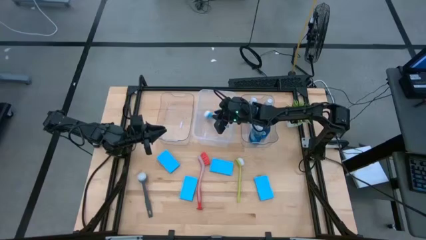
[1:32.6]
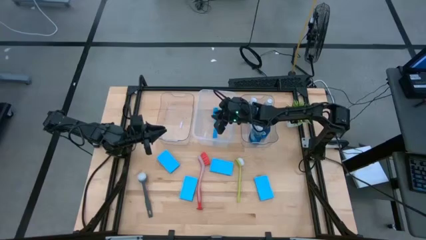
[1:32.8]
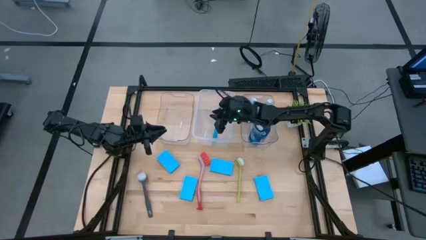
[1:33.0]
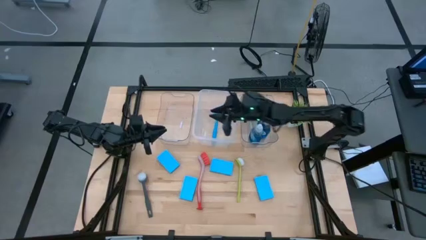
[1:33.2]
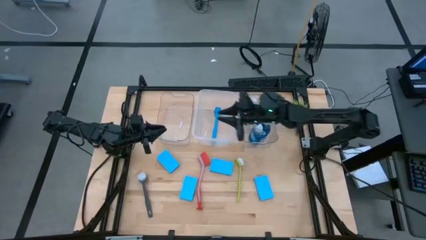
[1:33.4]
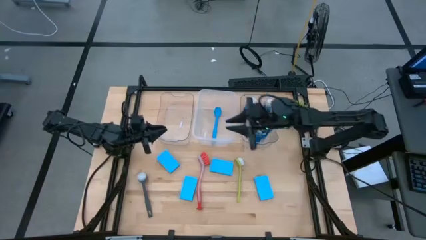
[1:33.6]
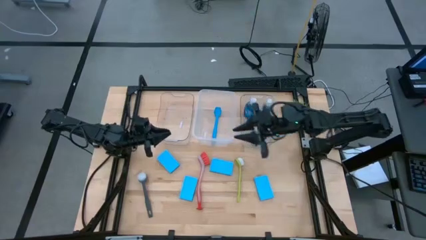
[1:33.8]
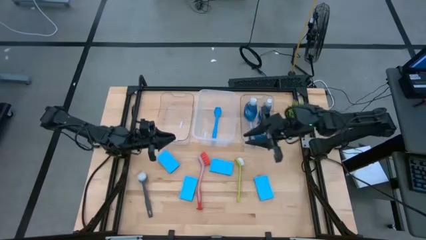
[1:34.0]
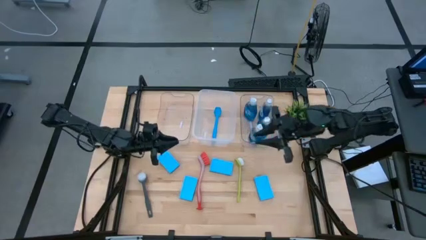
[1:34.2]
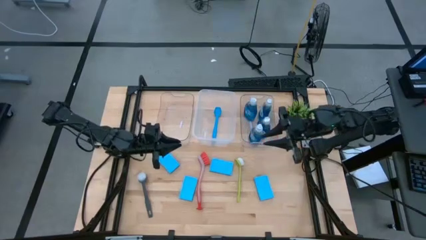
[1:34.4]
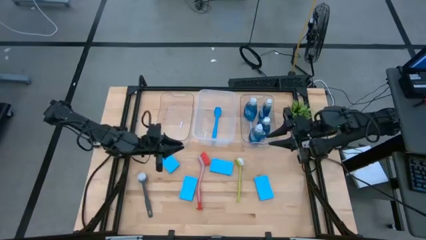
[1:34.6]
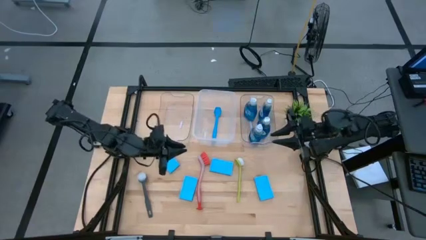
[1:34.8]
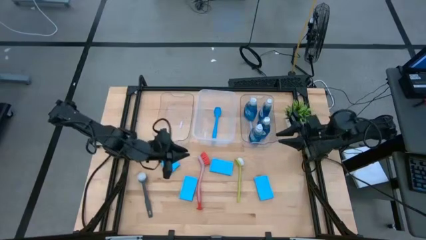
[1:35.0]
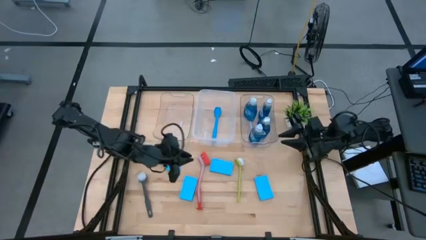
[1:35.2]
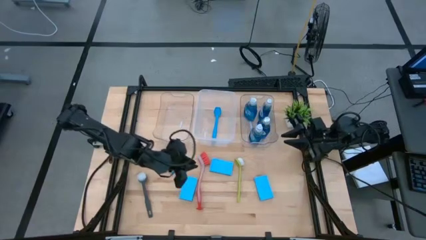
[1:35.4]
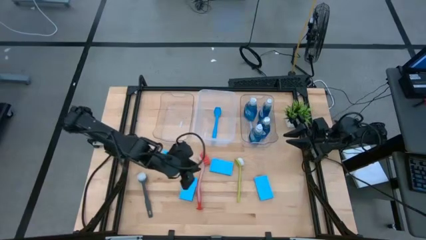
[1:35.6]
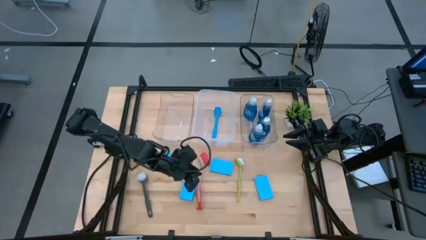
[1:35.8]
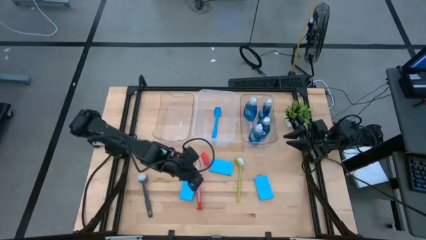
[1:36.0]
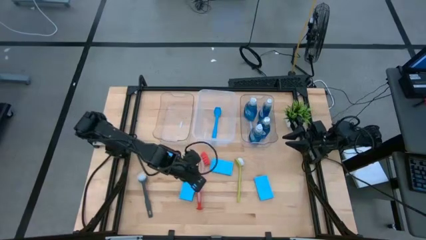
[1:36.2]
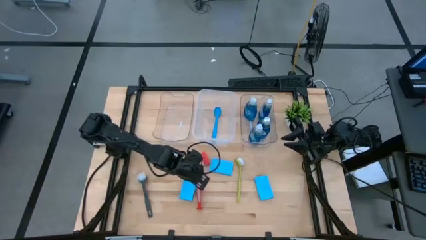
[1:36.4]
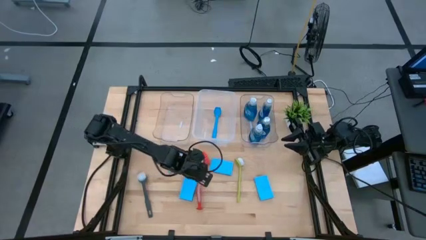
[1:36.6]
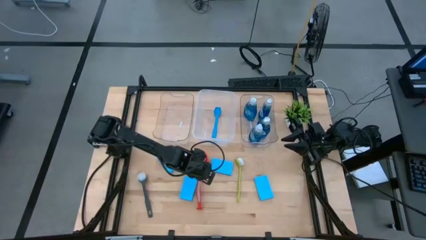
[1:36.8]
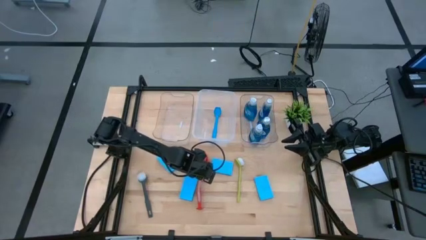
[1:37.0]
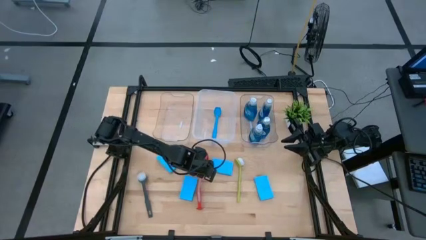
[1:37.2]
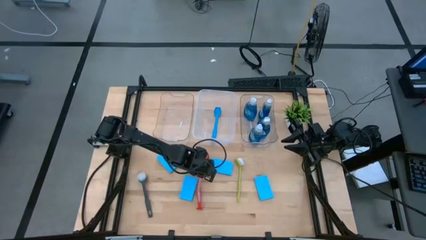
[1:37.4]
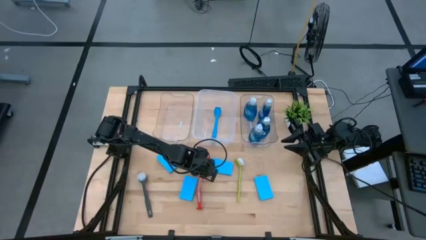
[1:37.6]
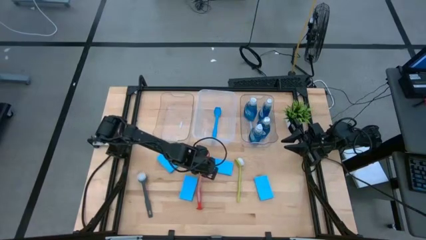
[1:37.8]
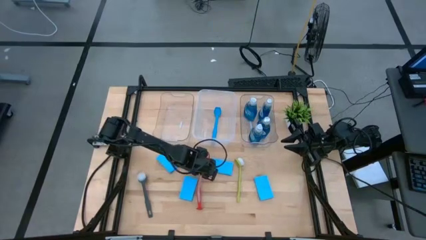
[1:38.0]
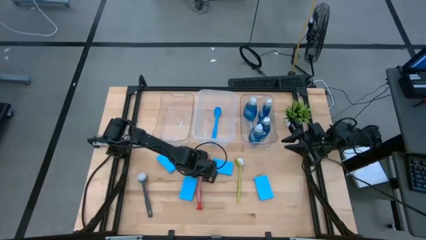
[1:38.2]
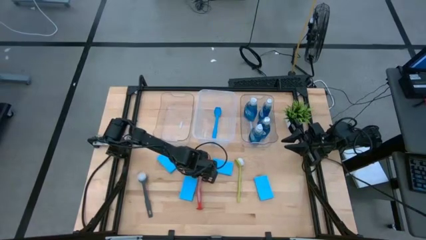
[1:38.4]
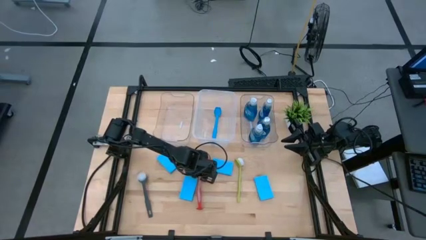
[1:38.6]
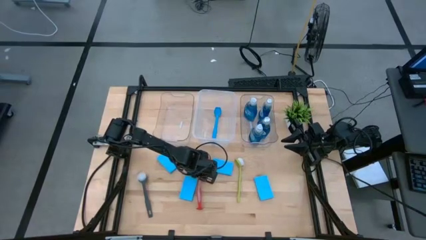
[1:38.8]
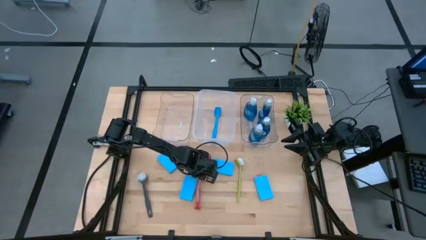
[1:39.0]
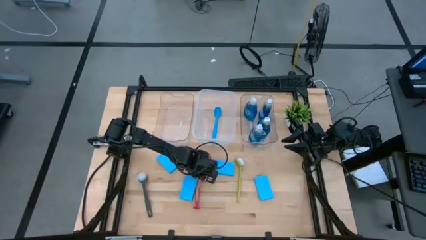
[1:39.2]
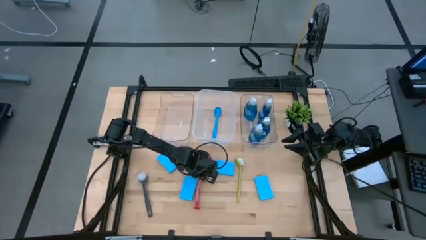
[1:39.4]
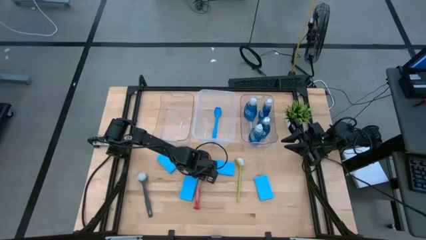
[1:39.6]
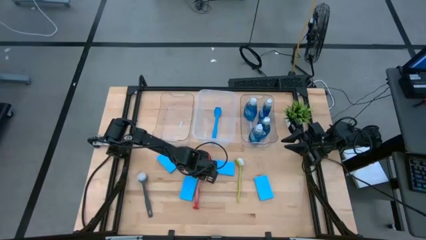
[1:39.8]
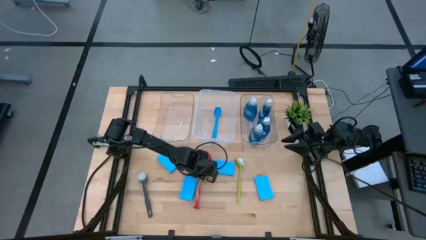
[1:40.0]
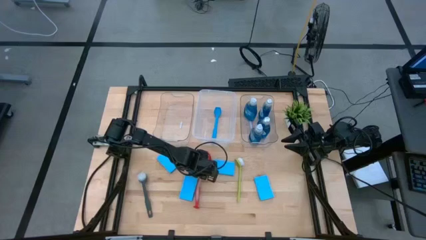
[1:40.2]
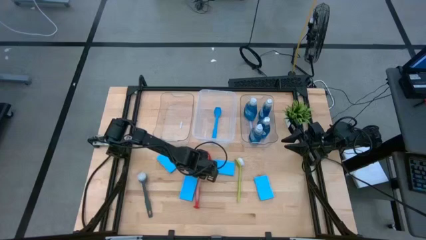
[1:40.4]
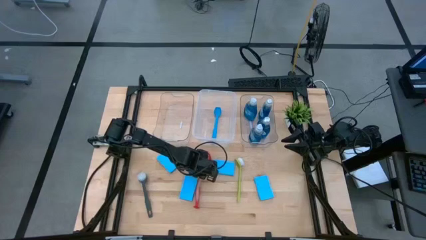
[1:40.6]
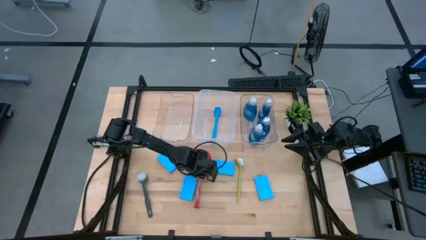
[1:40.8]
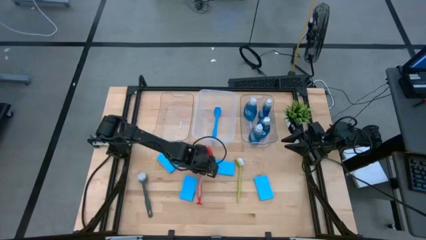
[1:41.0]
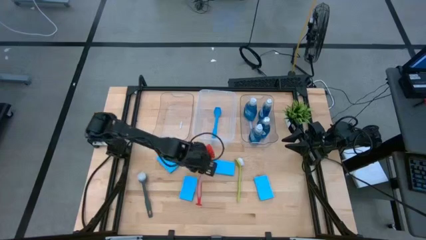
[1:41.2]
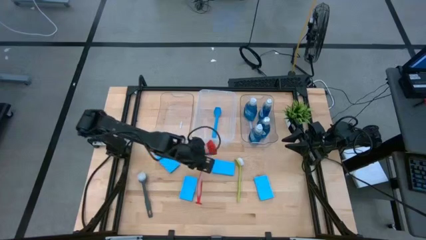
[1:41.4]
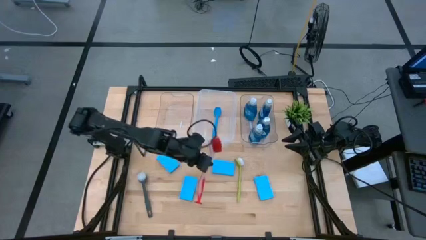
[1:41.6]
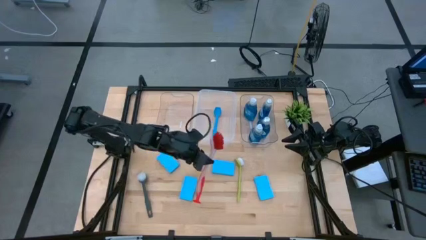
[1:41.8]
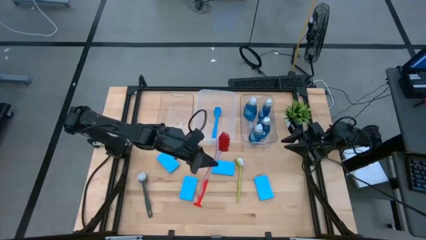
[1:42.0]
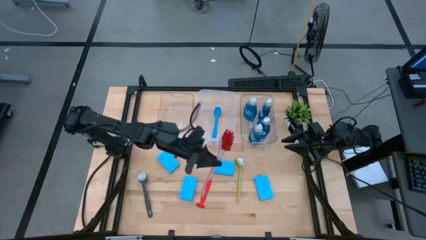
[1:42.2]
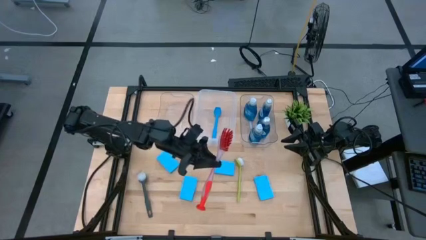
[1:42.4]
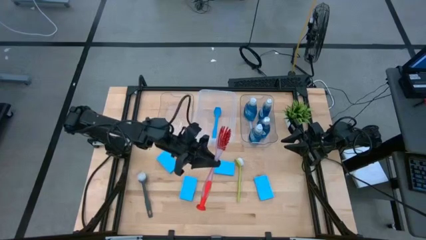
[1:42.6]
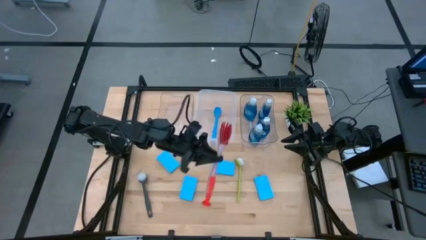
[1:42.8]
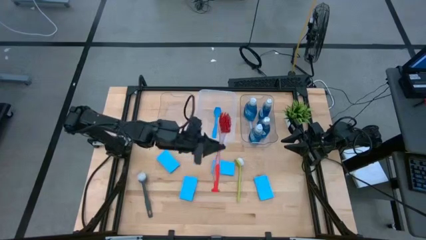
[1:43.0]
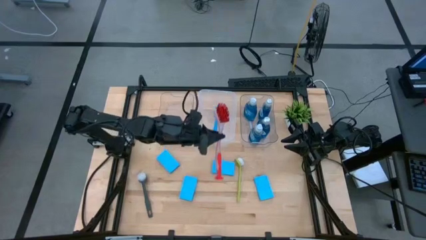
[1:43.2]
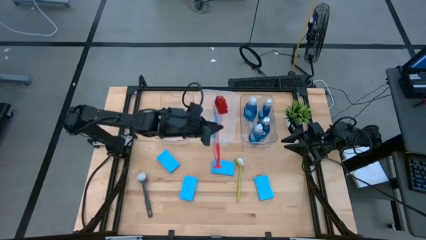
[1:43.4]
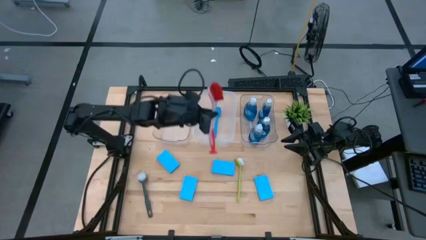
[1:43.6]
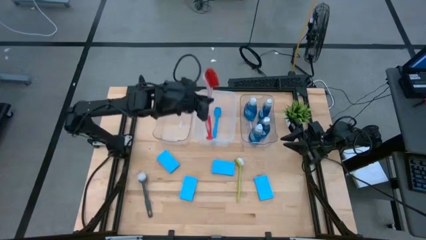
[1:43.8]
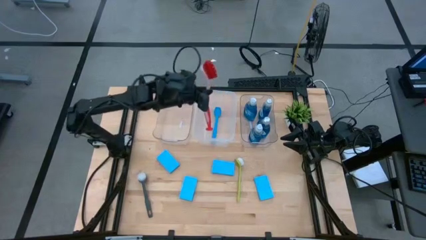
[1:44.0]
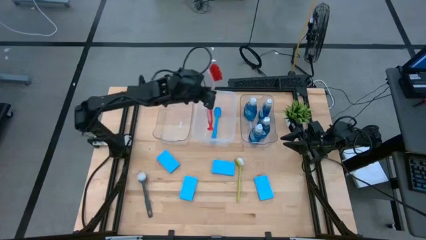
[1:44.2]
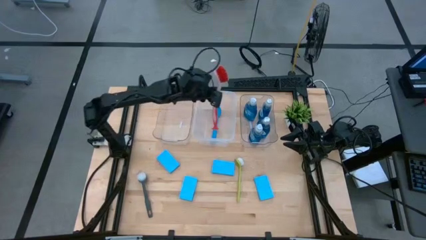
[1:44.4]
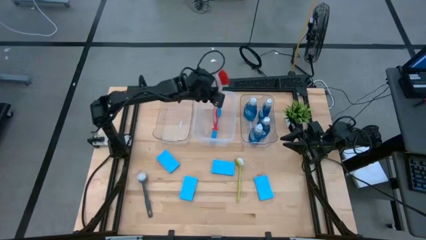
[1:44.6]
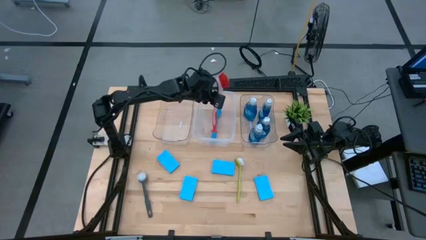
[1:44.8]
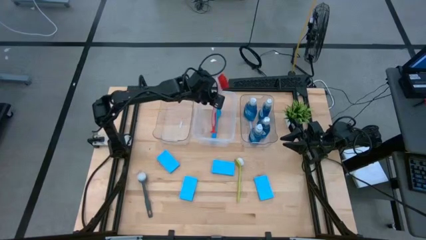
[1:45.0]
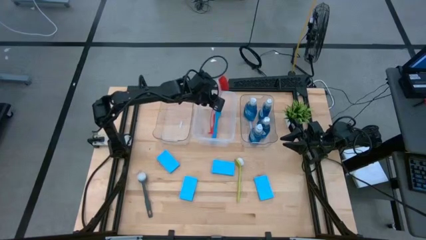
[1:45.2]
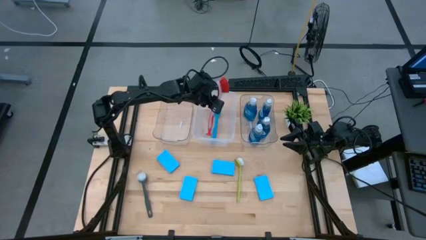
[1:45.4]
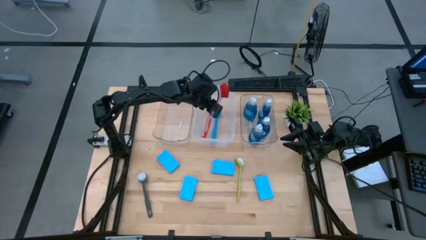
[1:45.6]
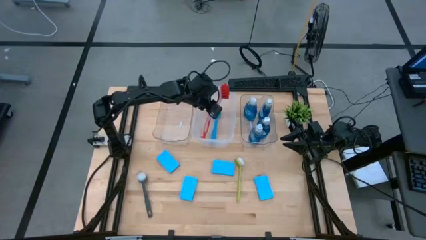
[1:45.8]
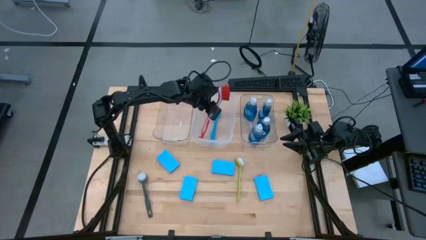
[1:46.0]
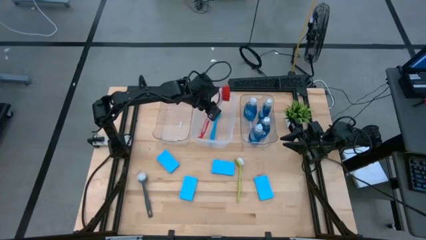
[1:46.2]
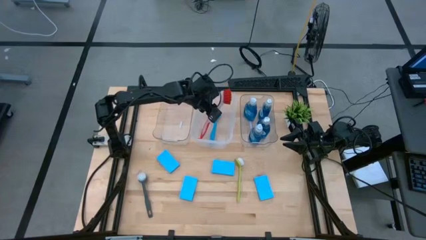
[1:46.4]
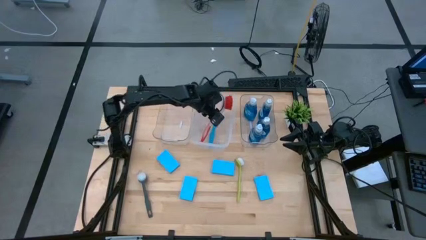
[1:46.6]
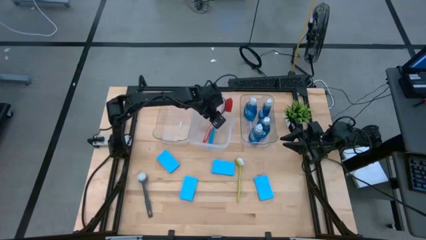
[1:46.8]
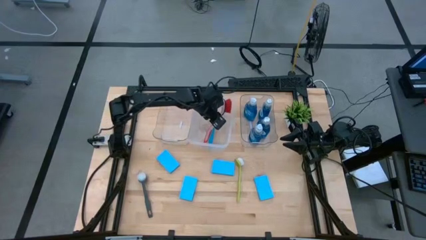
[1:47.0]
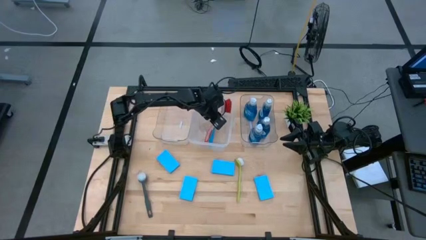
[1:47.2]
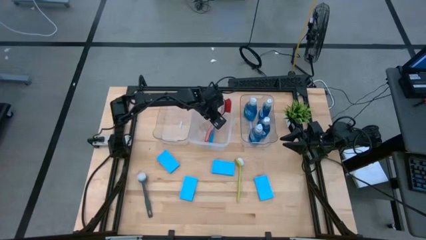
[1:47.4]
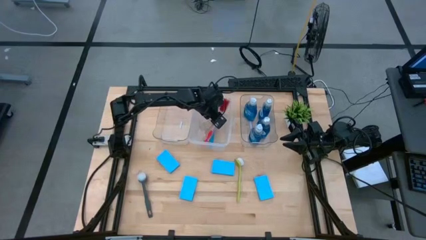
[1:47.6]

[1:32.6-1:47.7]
Task: Pick & Place Kitchen Sink Supplies
Put the red toilet brush into the middle transparent bin
